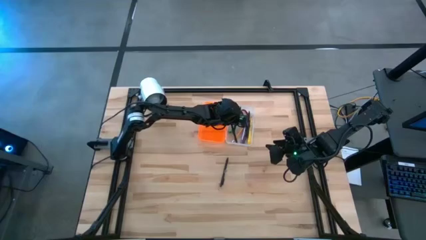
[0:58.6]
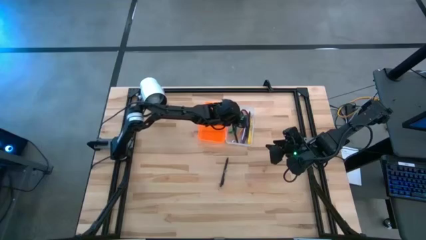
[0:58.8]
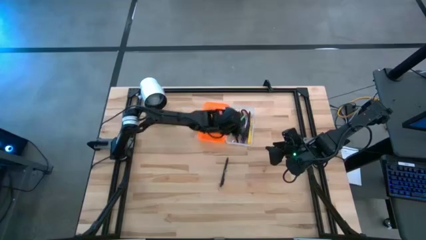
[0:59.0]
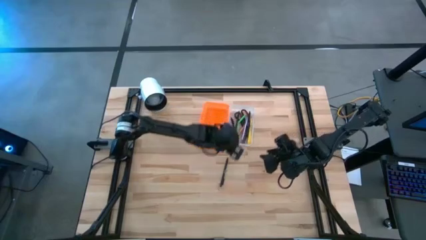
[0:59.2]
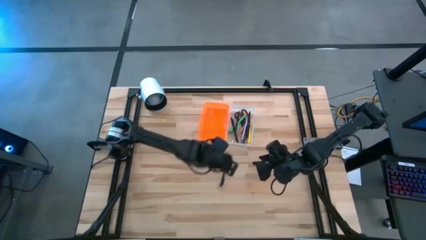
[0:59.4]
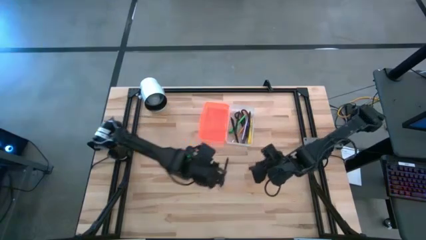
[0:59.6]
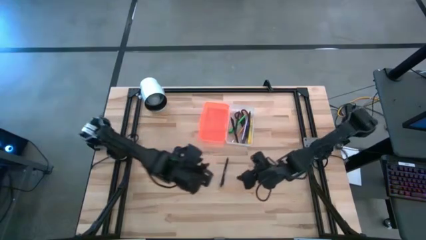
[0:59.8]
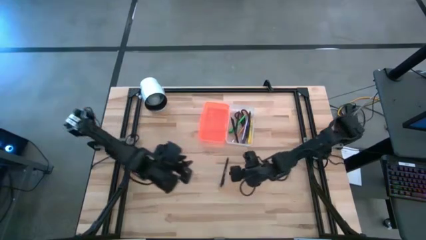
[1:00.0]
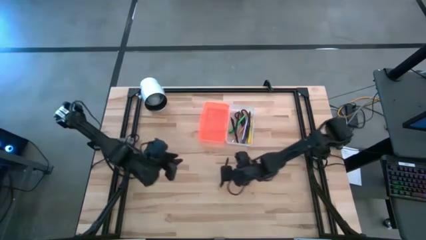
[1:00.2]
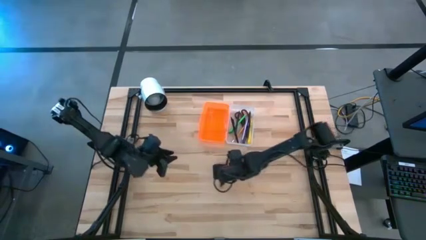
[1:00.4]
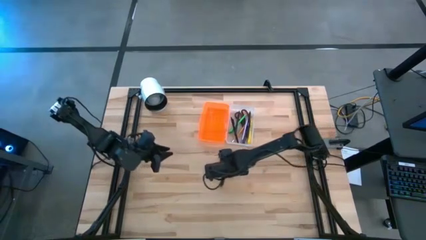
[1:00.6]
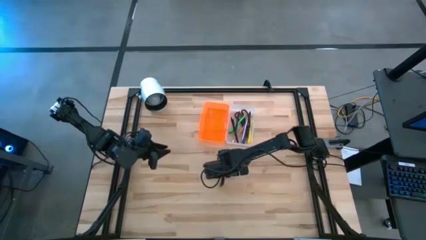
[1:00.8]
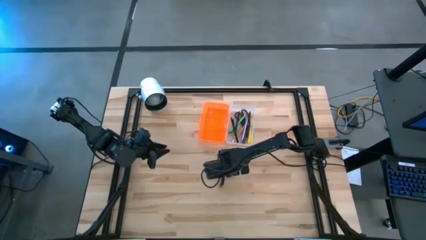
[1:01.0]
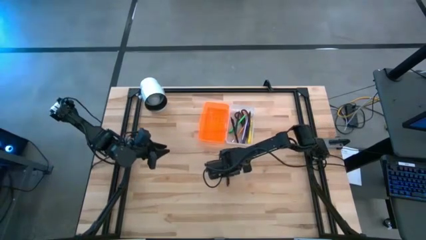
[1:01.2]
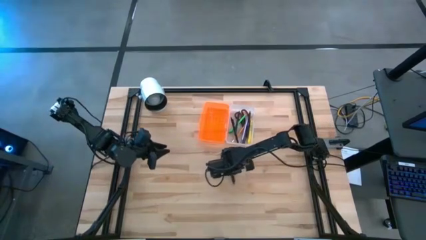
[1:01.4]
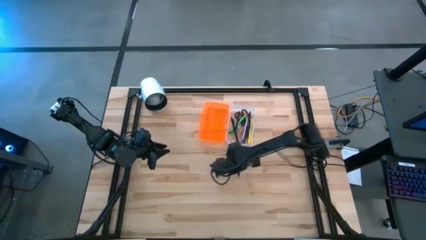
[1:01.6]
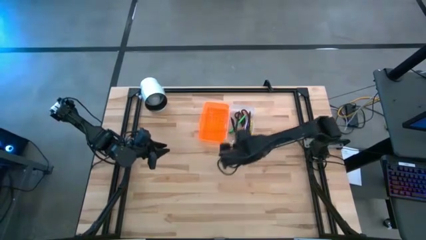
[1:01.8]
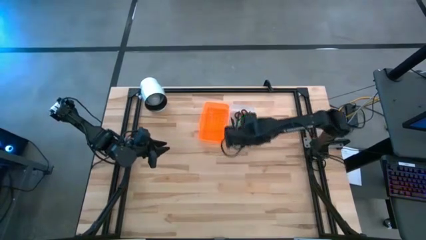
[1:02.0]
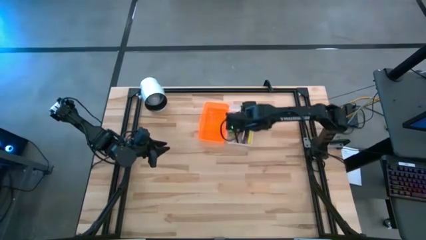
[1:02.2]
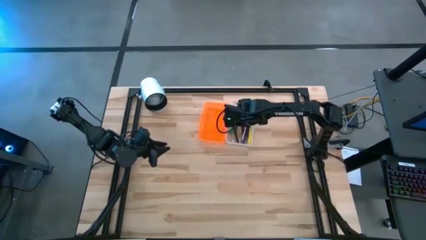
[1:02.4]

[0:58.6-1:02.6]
Task: Pick & place school supplies into a supply box
Put the black pen into the orange supply box

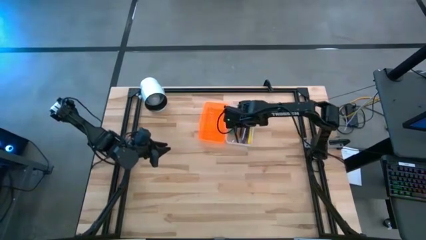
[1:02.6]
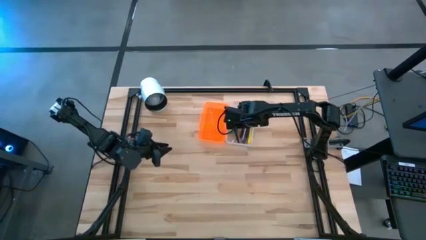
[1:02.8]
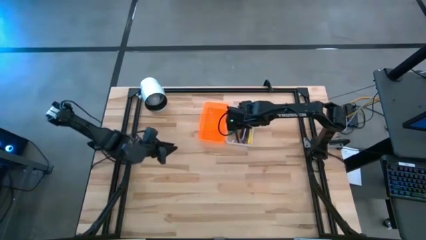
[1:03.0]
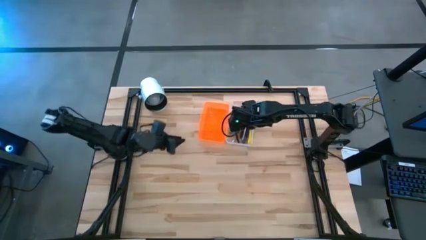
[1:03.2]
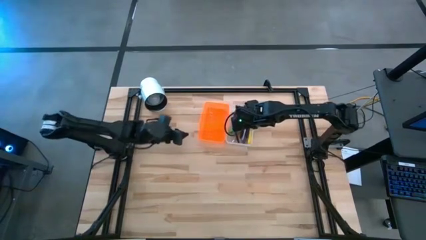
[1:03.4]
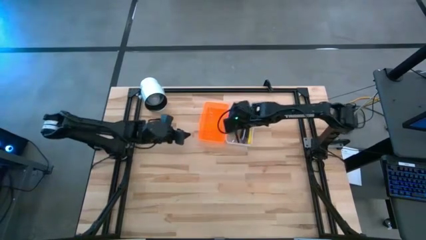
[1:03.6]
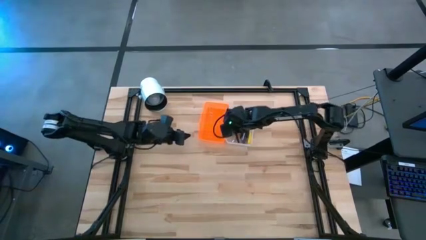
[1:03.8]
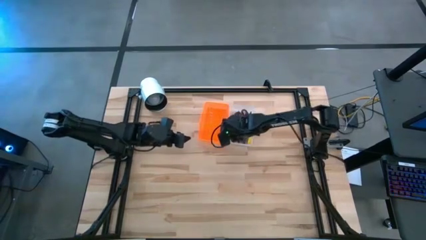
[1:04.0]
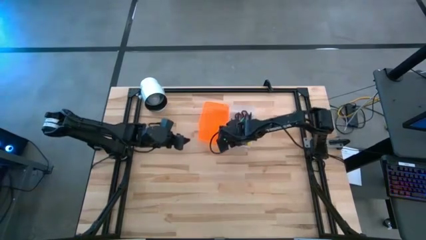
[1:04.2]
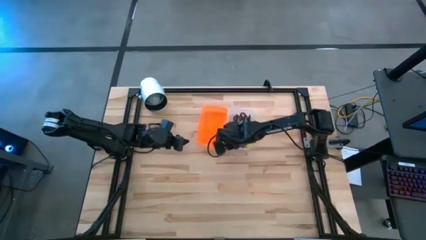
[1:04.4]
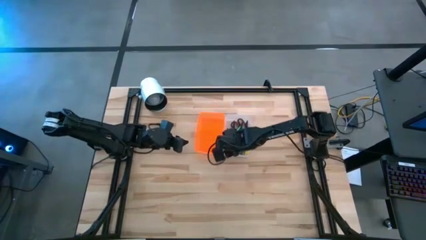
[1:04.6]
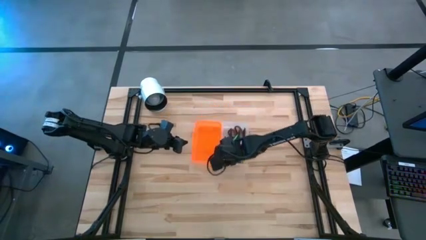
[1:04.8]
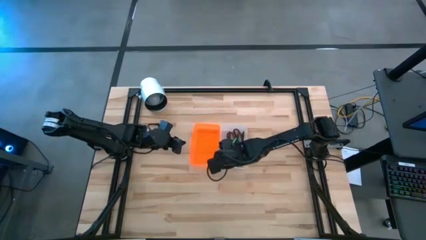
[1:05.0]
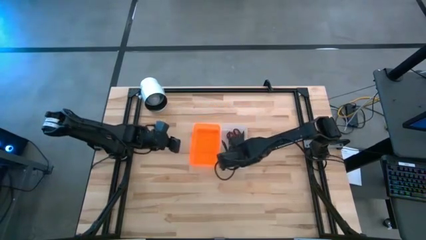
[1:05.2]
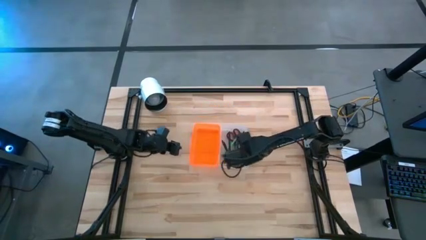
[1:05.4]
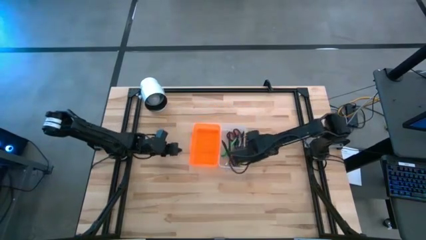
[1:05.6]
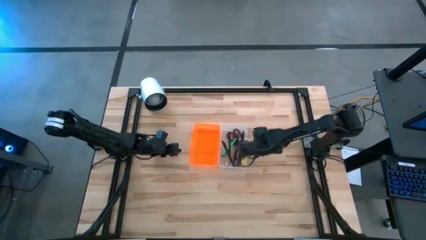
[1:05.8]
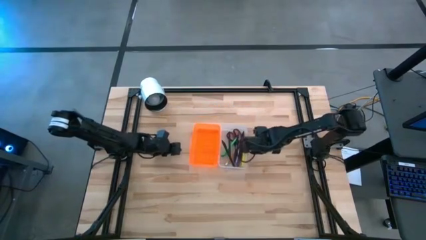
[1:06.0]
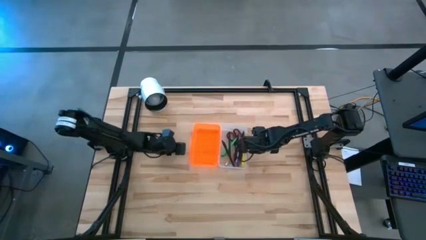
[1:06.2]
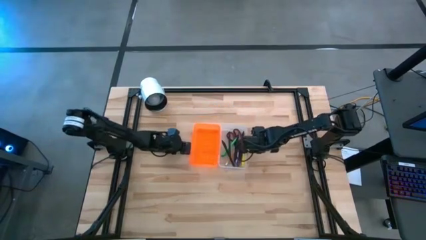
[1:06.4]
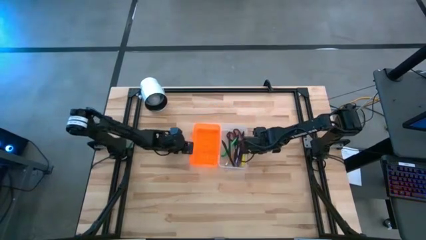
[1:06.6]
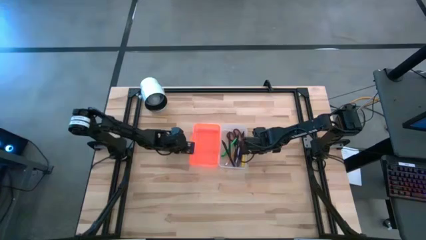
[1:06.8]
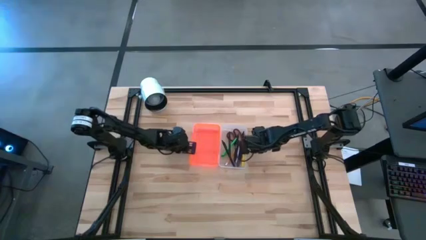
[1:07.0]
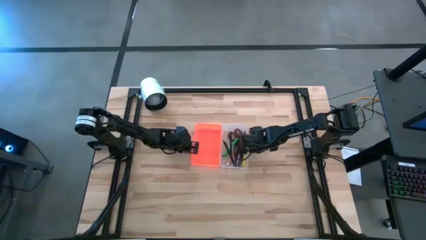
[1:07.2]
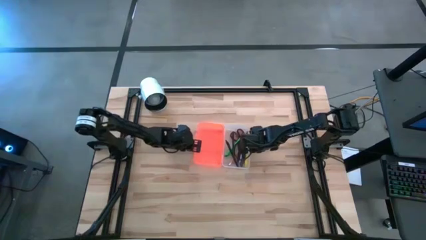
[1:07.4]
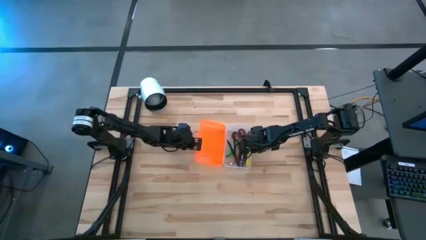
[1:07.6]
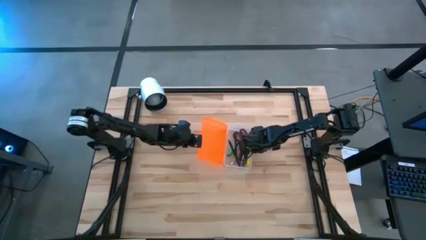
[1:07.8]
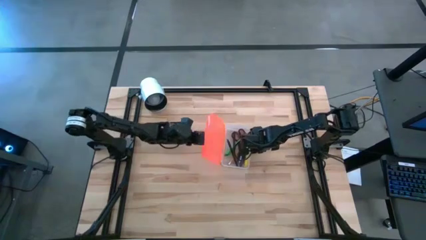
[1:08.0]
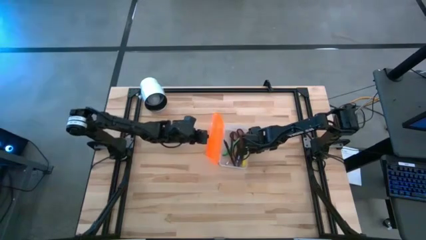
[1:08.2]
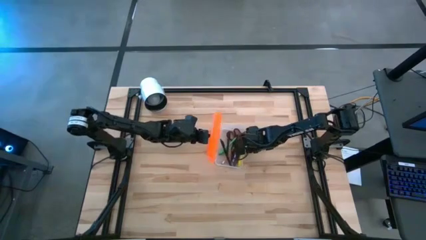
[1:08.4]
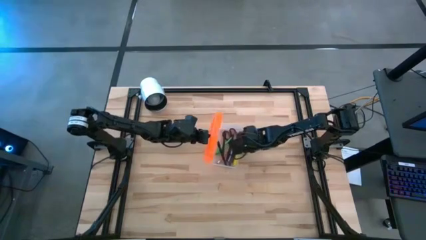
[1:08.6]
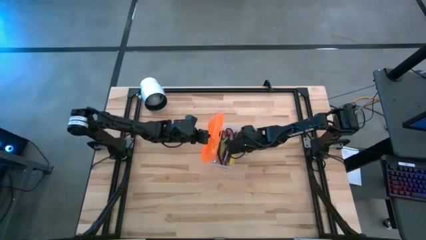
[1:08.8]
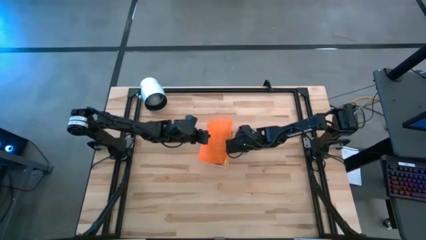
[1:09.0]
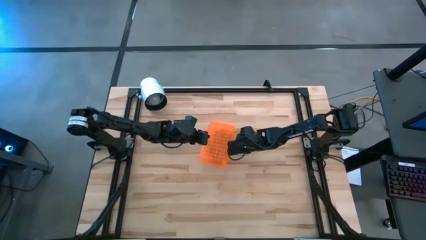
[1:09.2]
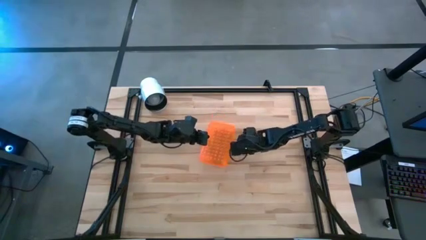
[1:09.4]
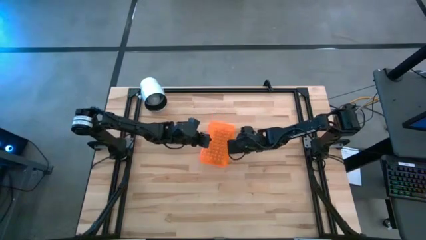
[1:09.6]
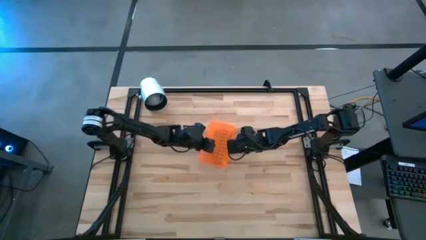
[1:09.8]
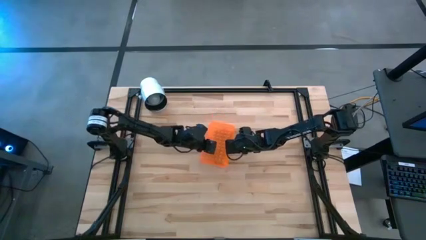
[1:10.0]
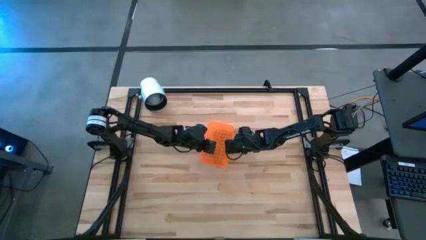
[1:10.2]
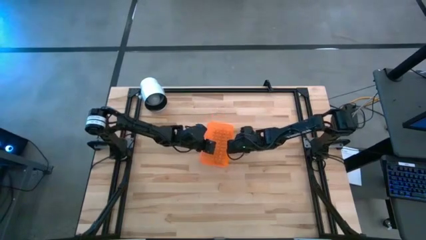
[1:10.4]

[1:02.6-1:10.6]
Close the orange supply box

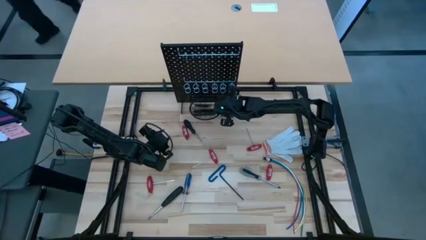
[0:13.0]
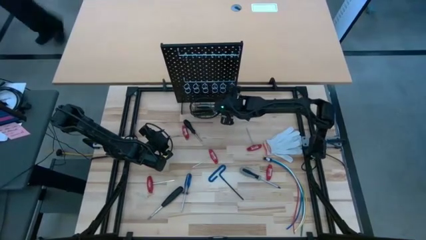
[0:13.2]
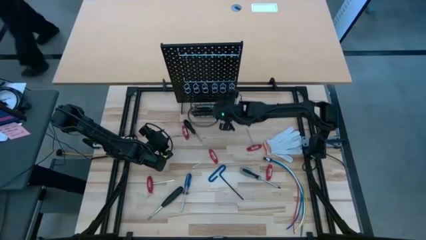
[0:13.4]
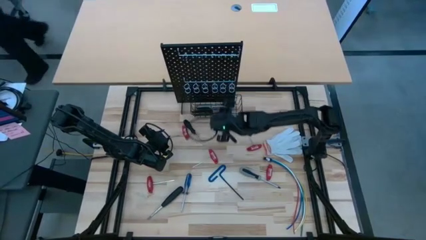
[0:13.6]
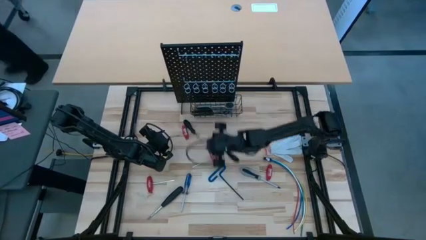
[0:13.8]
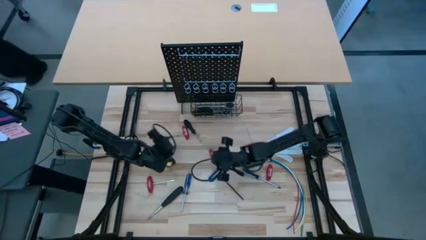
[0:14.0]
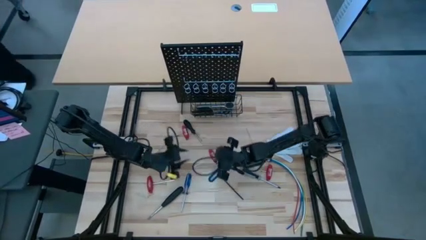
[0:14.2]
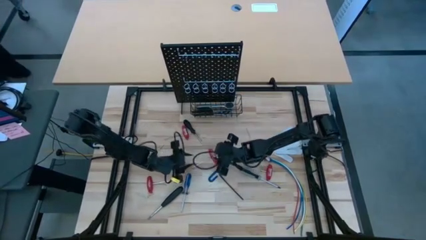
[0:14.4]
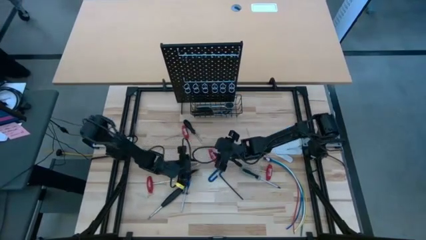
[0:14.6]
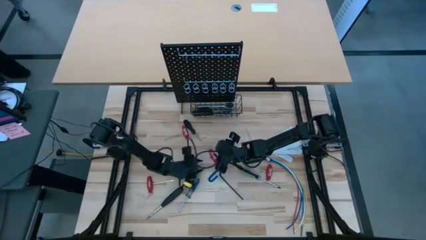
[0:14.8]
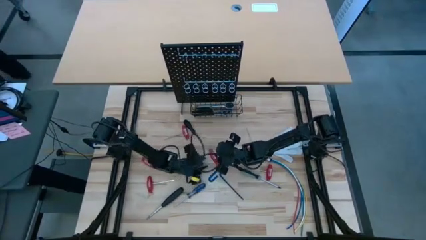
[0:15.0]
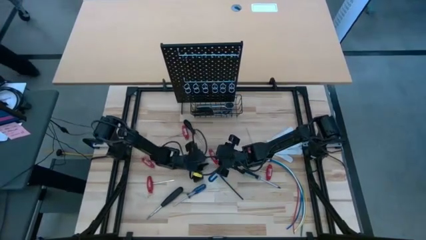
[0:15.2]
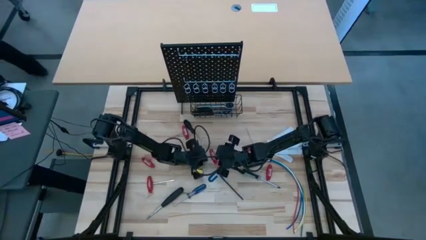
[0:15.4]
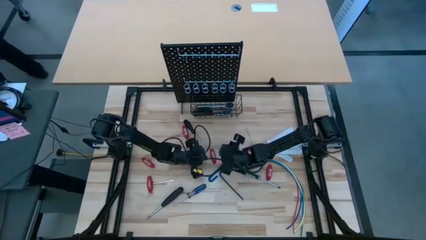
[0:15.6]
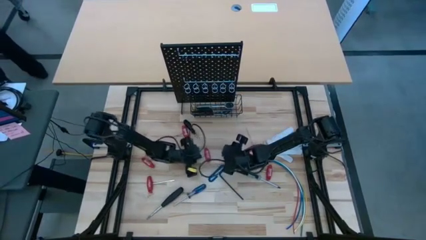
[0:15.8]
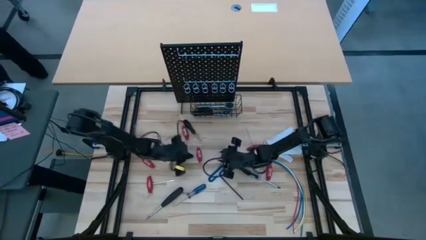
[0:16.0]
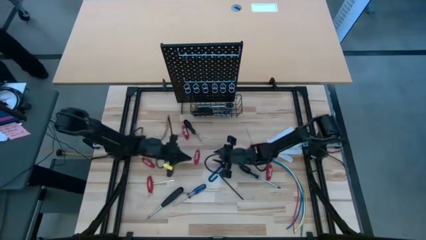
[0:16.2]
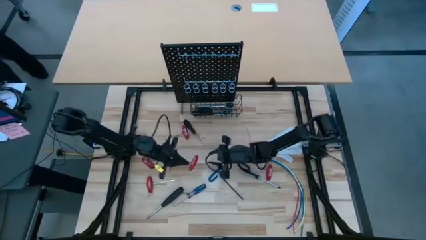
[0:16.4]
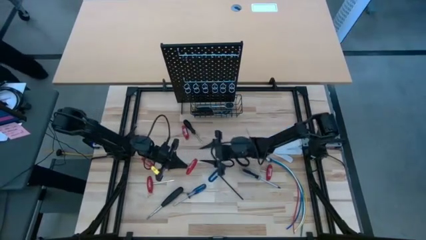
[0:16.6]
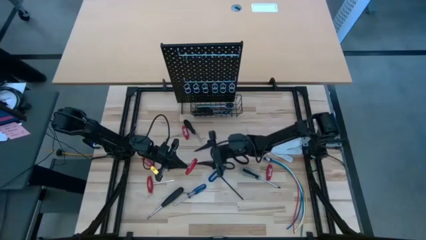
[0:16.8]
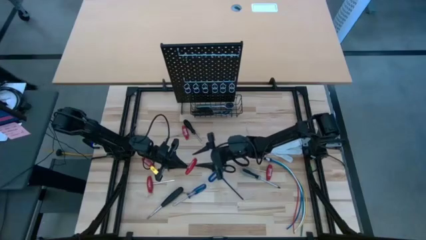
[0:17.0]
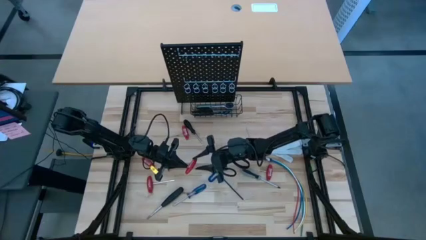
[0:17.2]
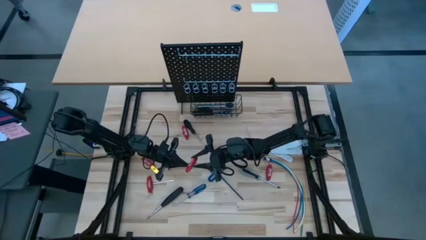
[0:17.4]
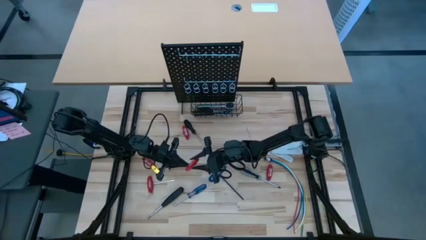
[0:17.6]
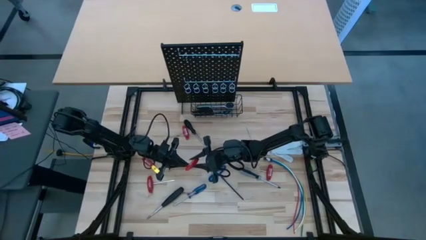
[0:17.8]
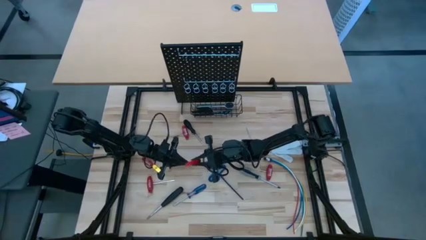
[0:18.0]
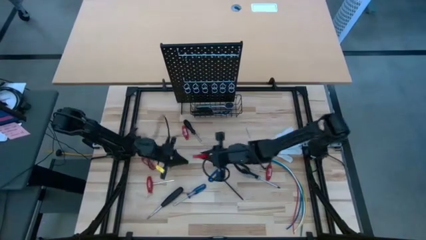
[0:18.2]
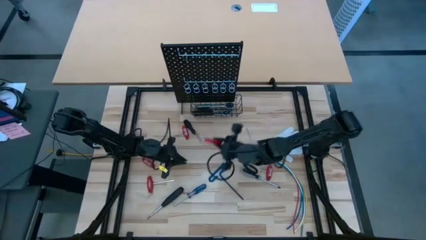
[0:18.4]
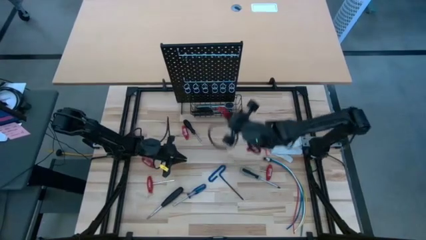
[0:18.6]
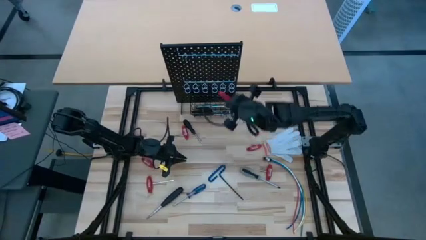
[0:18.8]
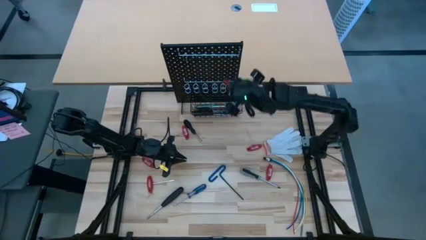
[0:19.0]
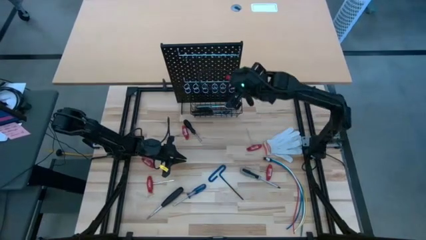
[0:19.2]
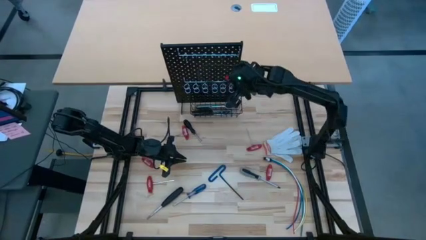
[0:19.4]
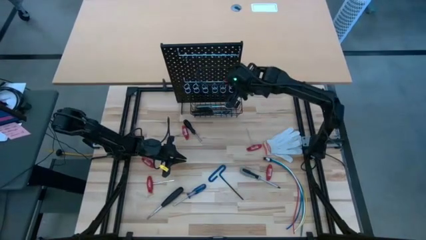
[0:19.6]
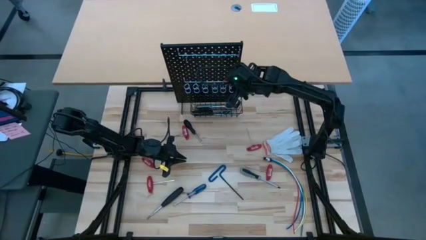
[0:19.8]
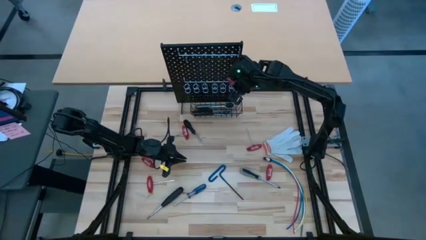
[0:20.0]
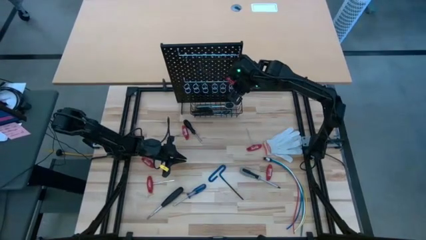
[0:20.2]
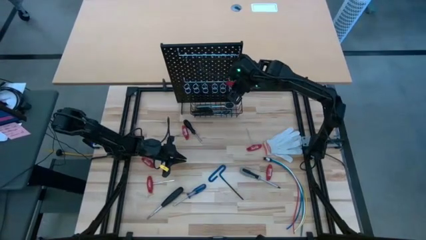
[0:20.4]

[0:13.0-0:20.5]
Task: Hang tools onto peg board
Hang the red Allen wrench on the pegboard
